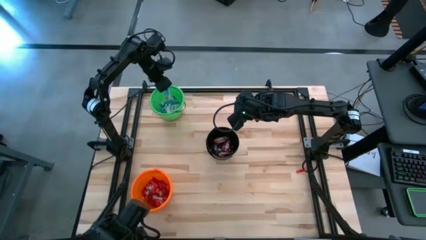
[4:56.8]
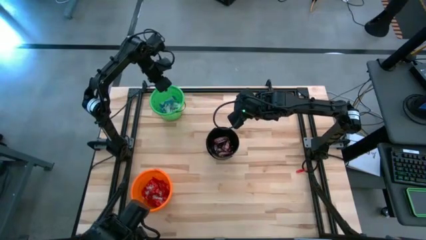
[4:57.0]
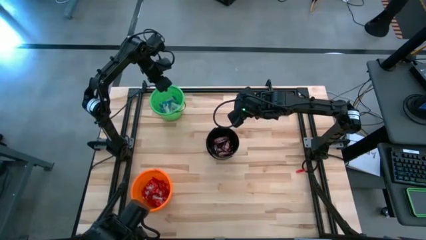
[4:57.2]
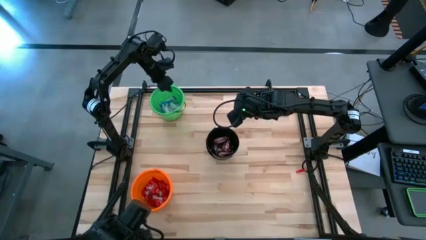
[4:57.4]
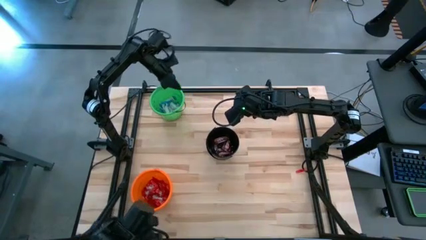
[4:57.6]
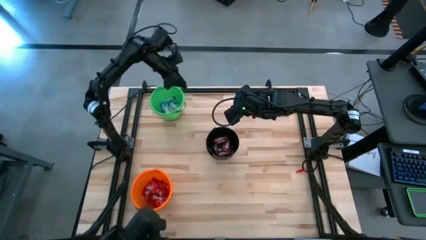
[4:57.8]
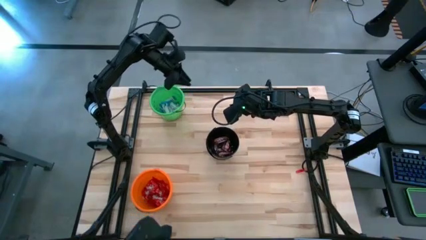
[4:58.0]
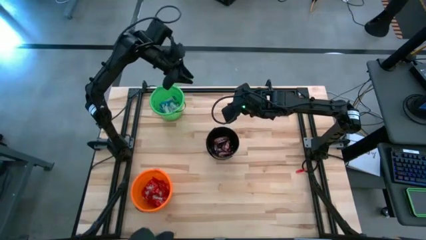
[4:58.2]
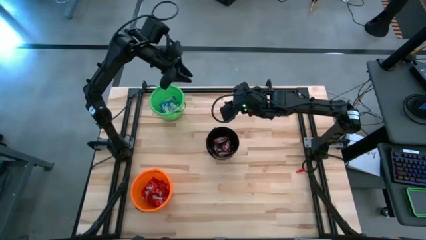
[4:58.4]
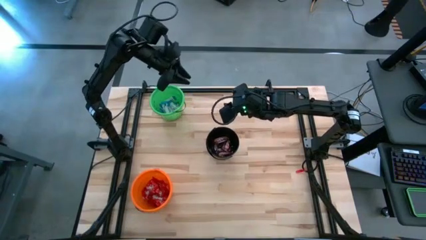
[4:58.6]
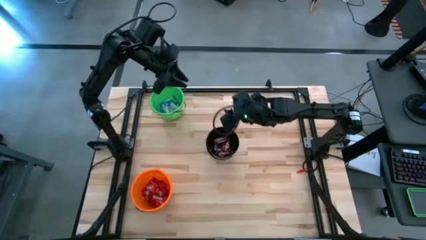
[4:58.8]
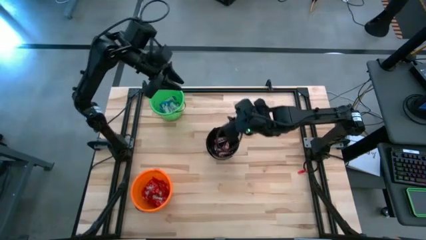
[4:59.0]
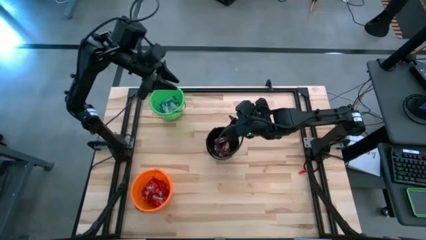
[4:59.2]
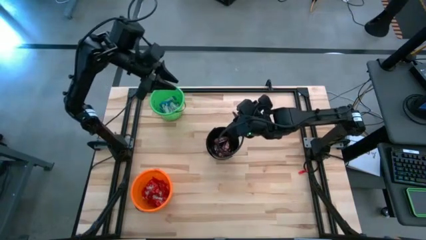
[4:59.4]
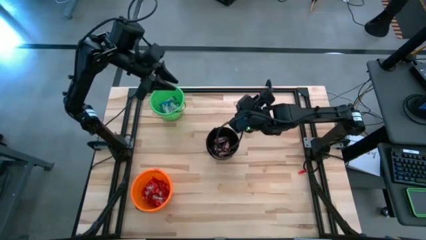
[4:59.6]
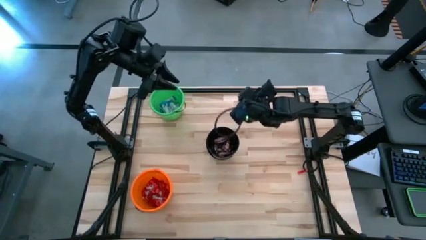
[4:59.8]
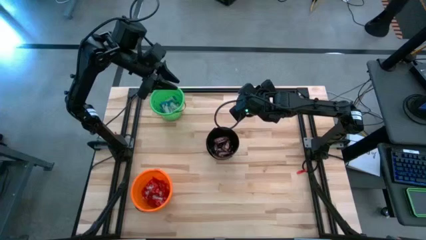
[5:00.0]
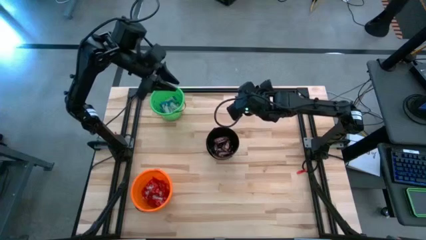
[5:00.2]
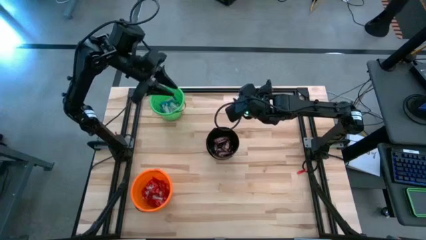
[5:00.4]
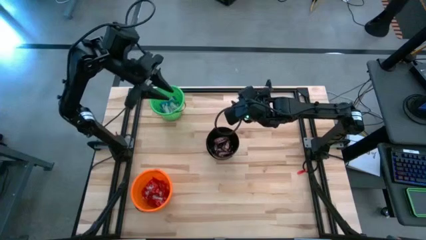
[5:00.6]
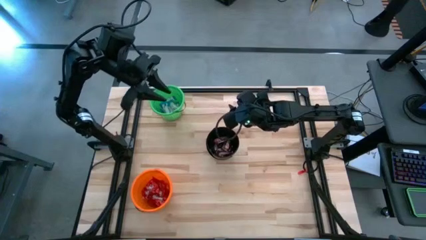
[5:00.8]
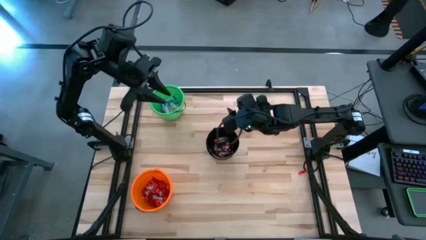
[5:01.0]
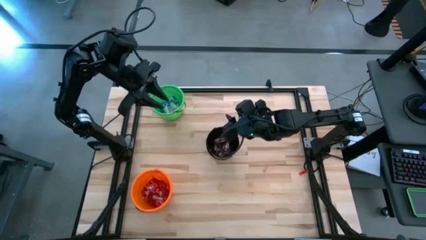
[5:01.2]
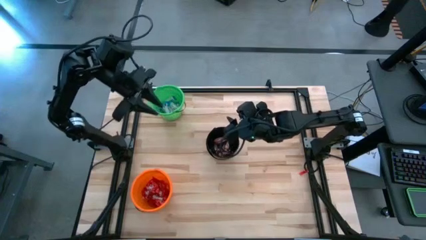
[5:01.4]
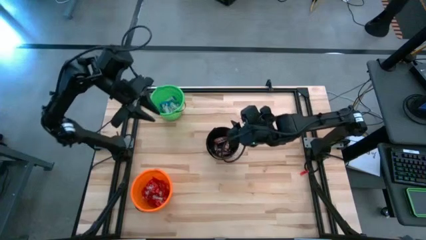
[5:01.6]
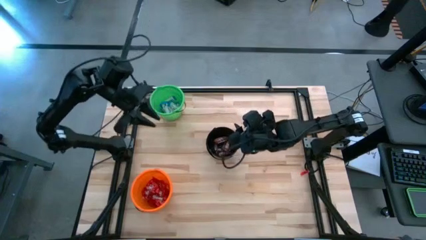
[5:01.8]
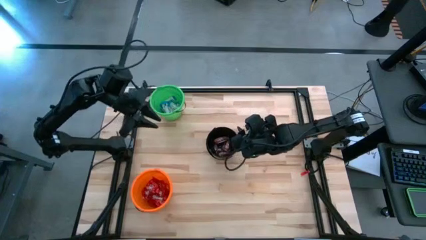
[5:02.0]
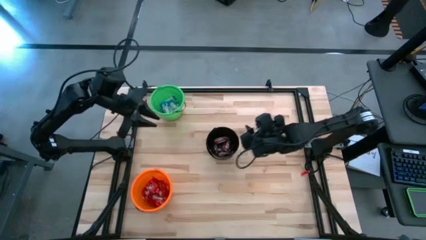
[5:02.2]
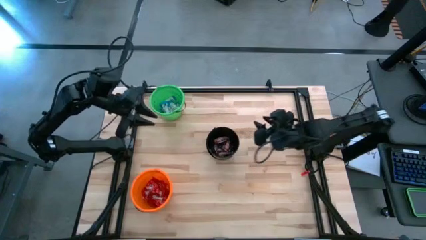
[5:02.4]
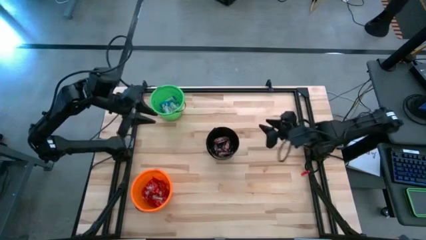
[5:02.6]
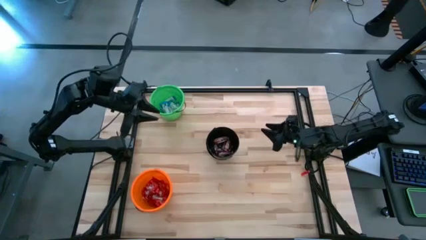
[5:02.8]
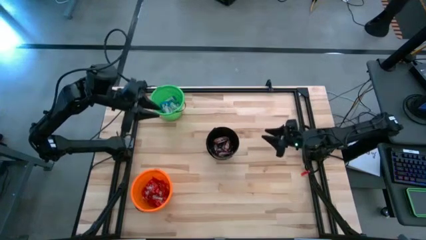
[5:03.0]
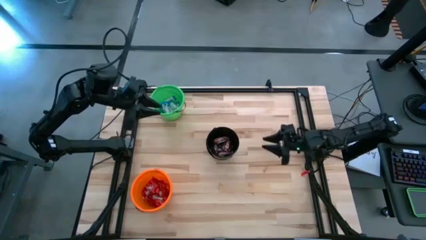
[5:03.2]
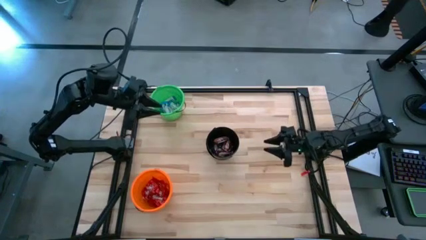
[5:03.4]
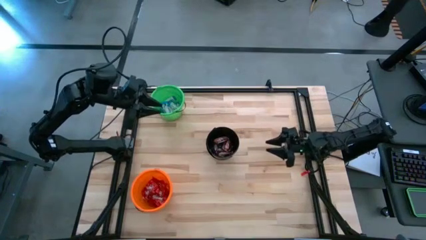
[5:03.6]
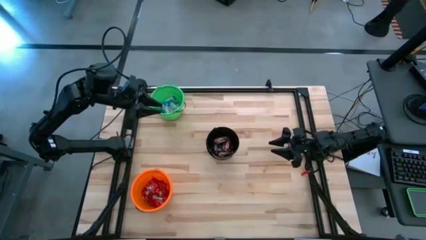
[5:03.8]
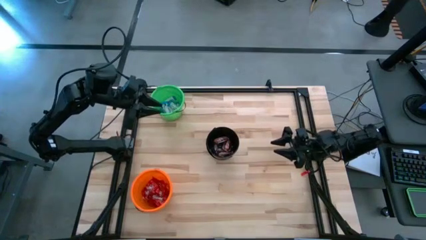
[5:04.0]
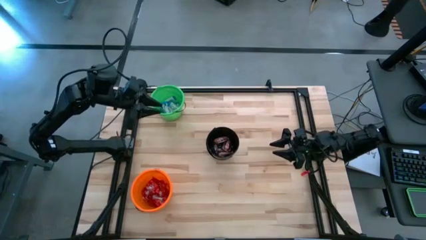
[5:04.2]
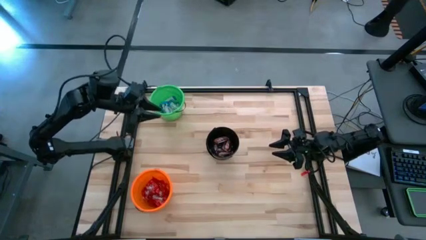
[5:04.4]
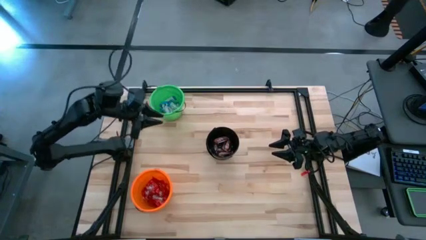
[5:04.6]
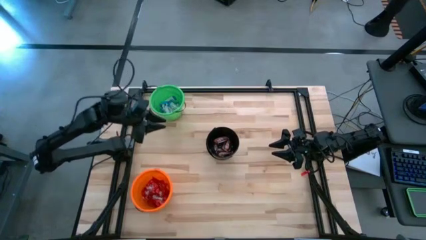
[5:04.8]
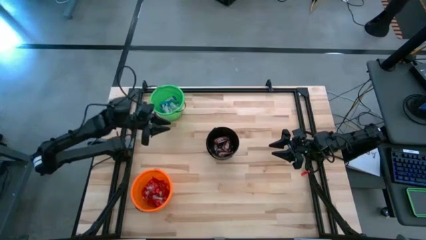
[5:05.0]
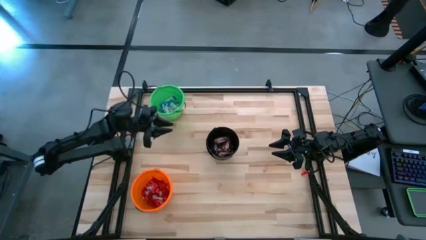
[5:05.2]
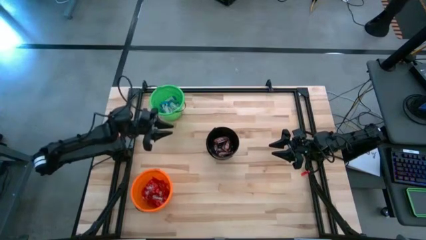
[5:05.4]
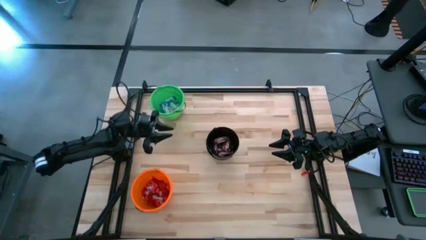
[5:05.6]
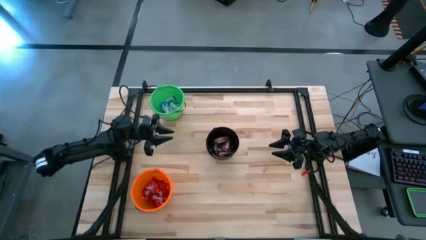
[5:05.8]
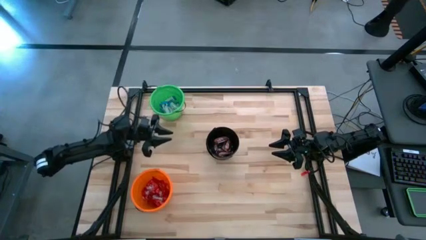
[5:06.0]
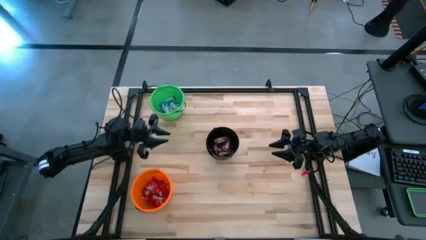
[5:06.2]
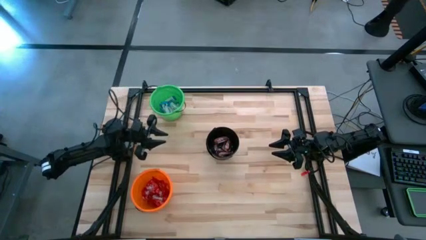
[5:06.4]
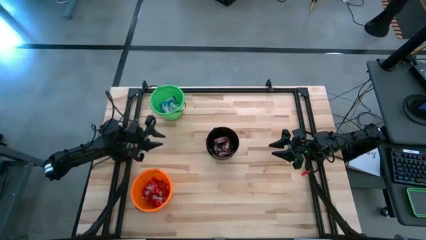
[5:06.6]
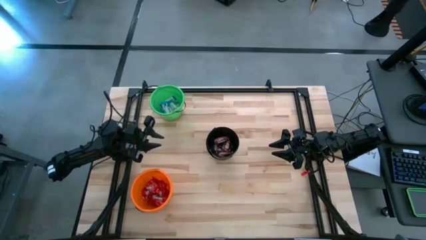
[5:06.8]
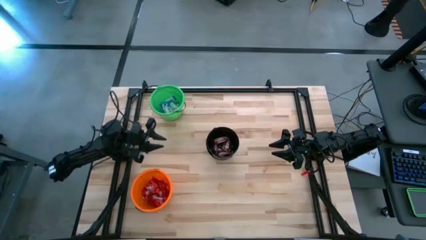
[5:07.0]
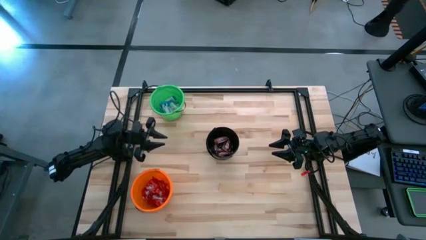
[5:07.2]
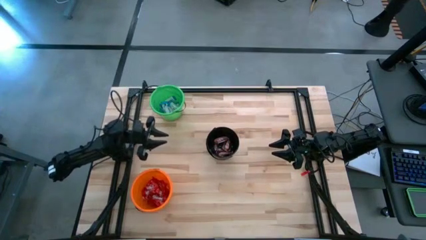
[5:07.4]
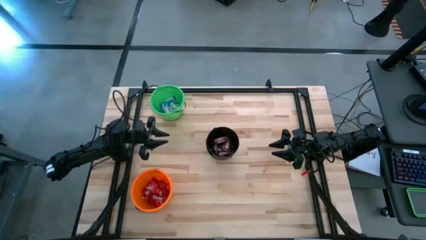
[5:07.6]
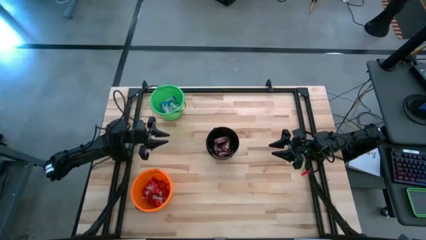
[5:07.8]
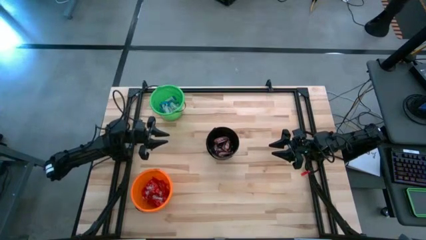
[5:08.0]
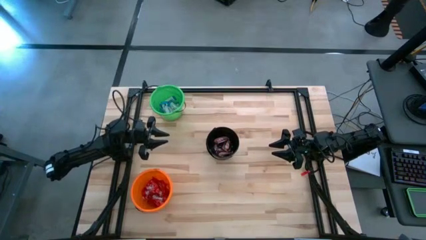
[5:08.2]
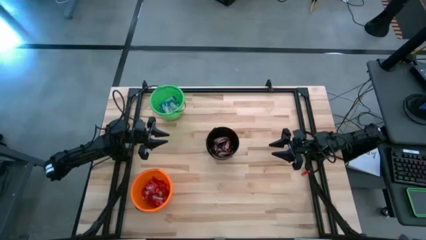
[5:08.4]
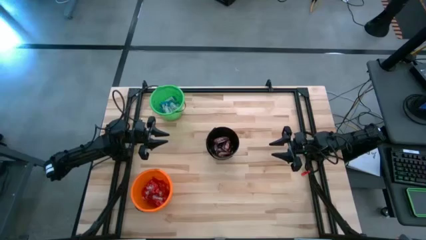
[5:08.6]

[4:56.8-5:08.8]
Task: Sort candy
Return to Home Position

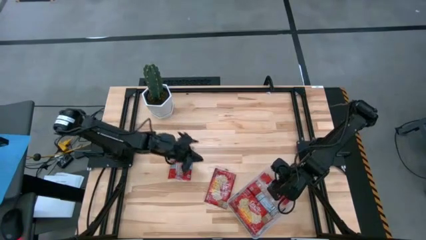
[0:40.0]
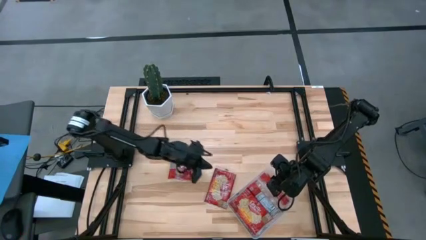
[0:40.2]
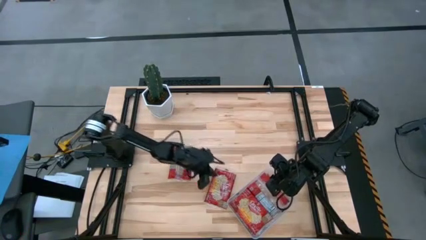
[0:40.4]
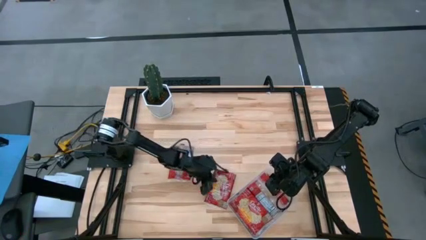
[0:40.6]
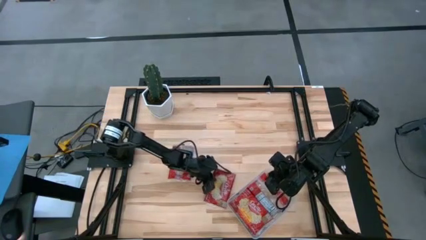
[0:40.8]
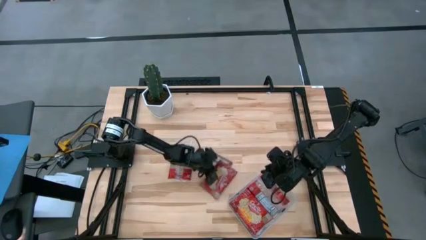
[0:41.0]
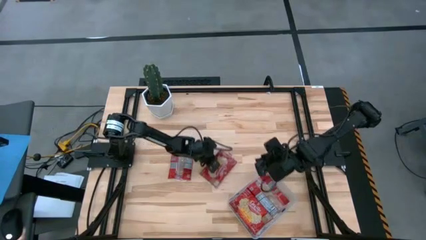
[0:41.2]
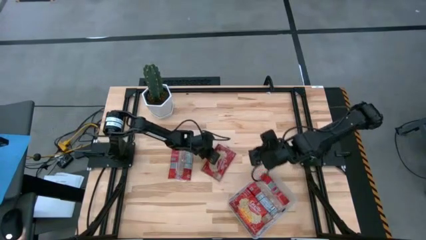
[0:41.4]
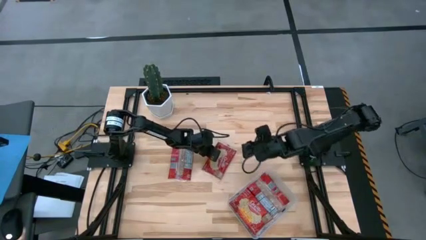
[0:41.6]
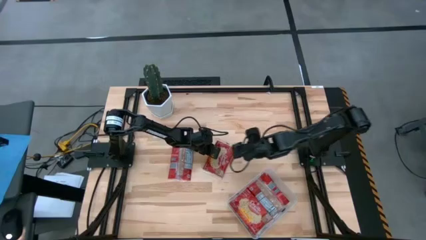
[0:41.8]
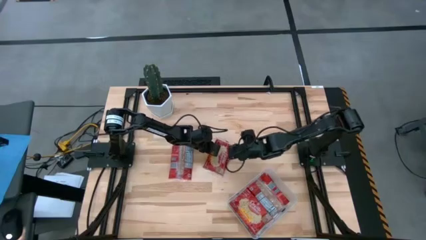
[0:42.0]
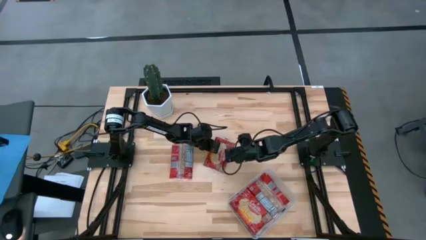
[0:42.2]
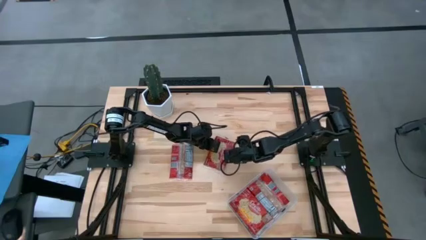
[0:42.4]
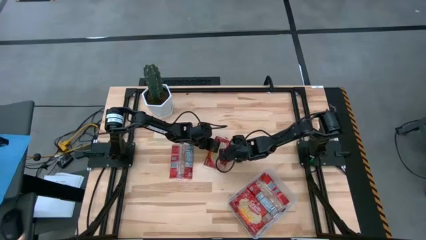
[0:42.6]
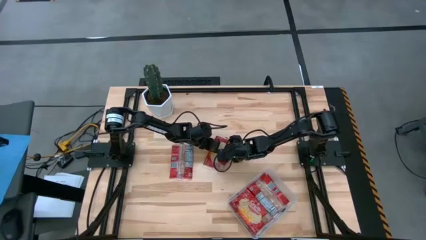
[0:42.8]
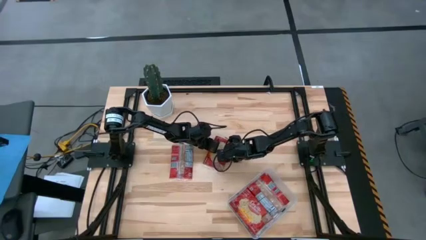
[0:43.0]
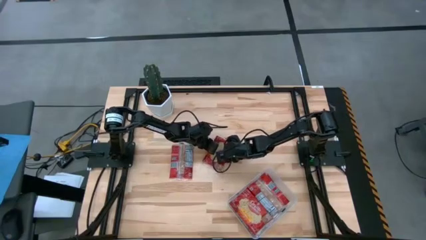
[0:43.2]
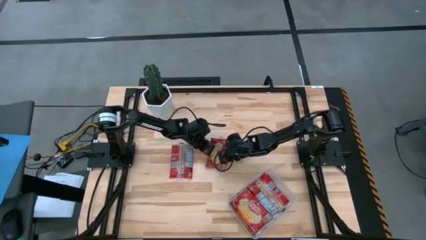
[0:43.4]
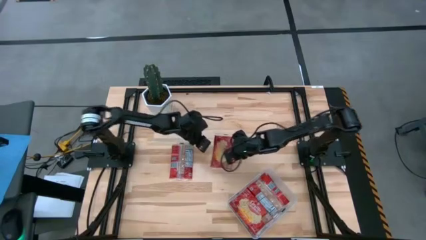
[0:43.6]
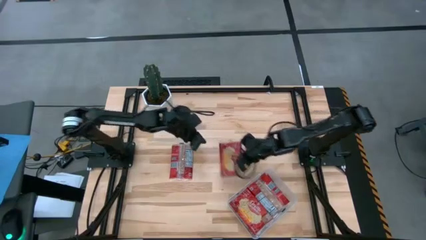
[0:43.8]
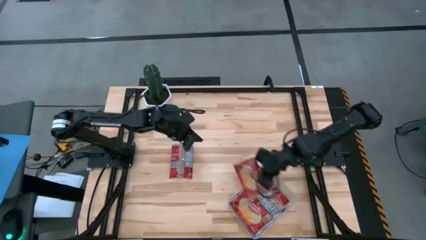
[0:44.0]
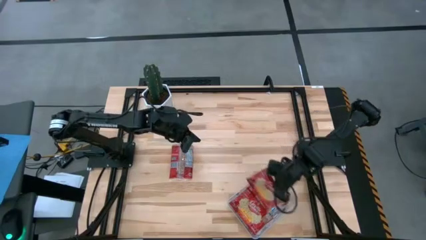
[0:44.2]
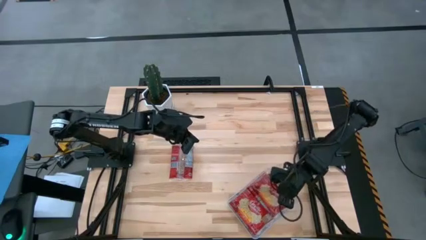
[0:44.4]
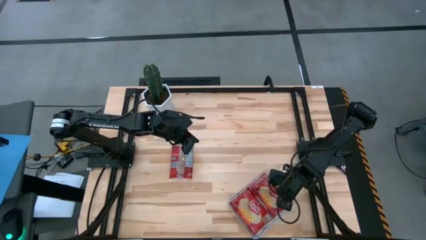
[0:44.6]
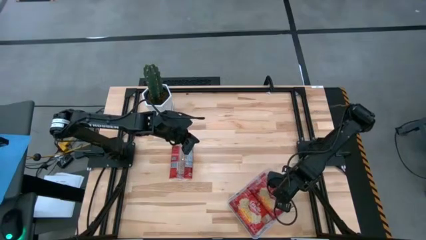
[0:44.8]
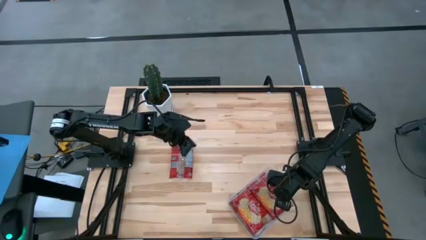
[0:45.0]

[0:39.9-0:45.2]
Task: Sort popcorn bags into baskets
Put the bottom red popcorn bag into the transparent container
